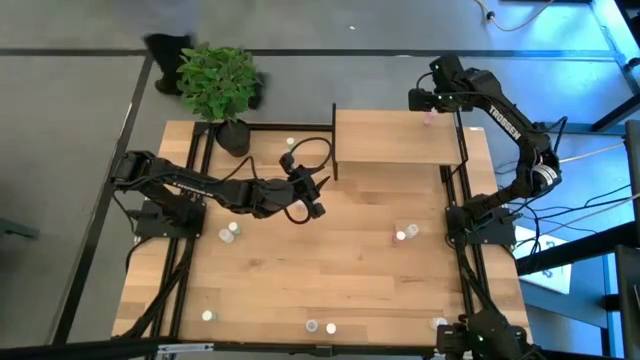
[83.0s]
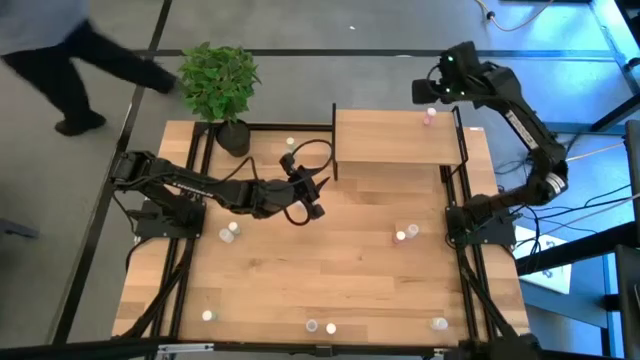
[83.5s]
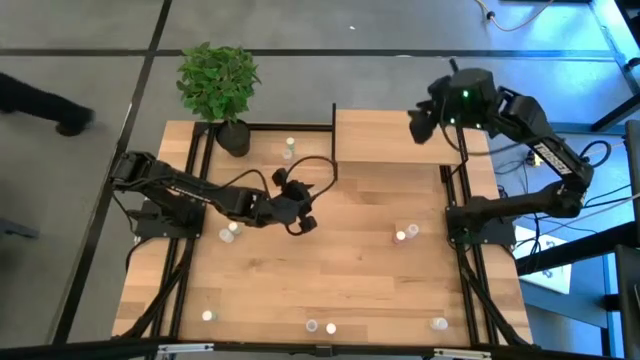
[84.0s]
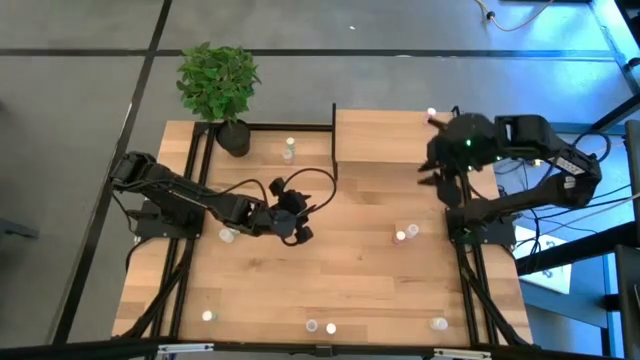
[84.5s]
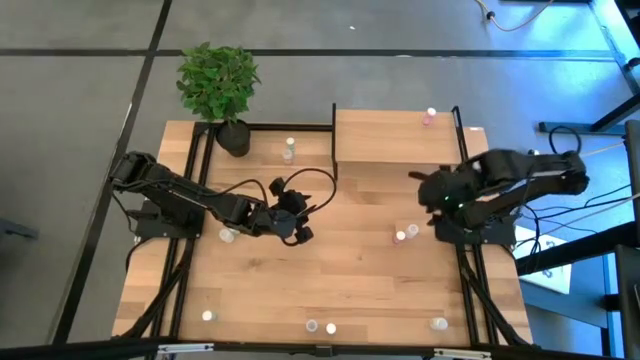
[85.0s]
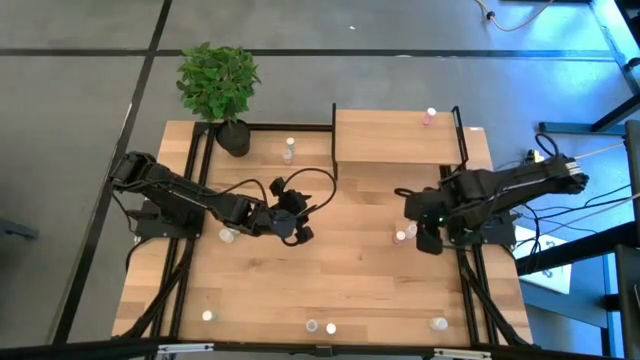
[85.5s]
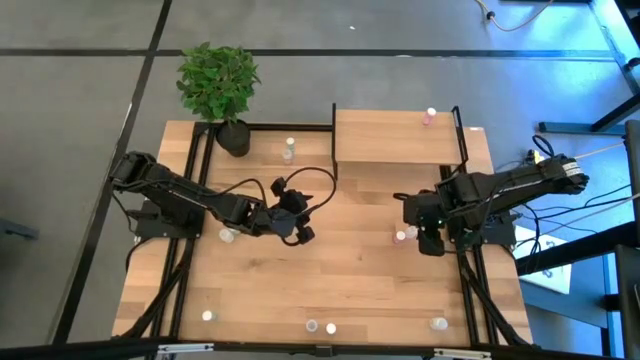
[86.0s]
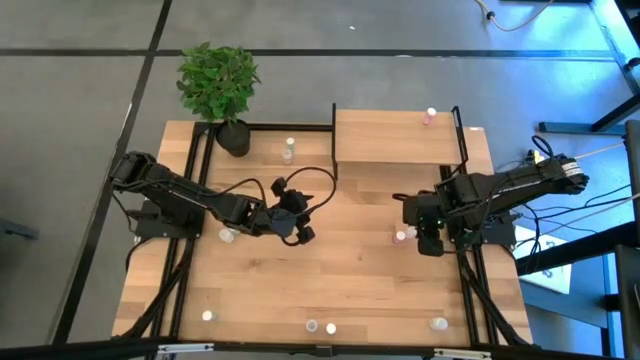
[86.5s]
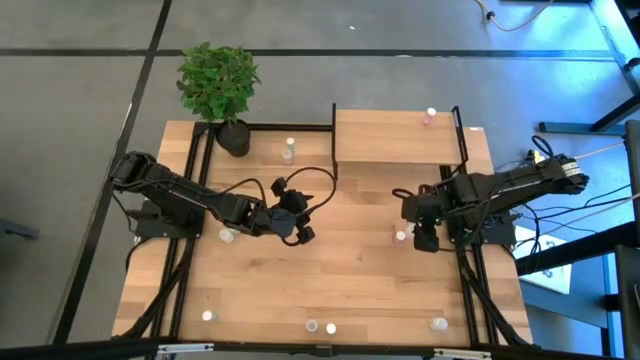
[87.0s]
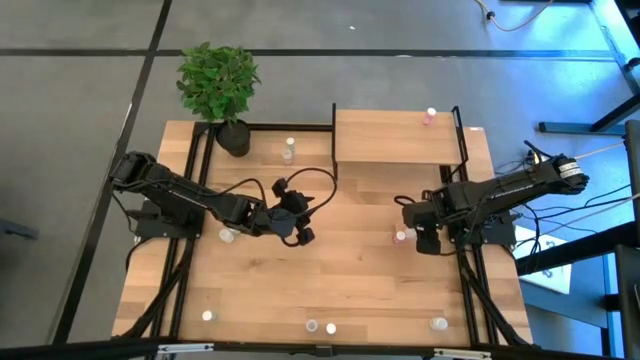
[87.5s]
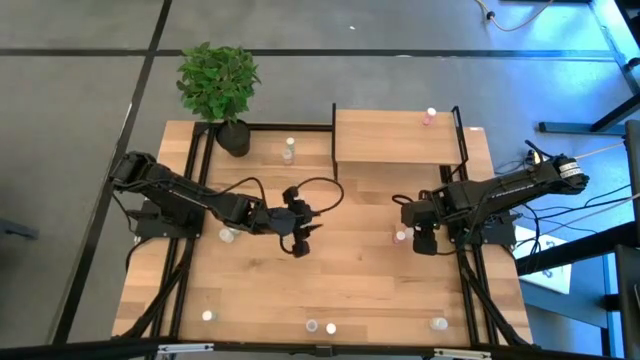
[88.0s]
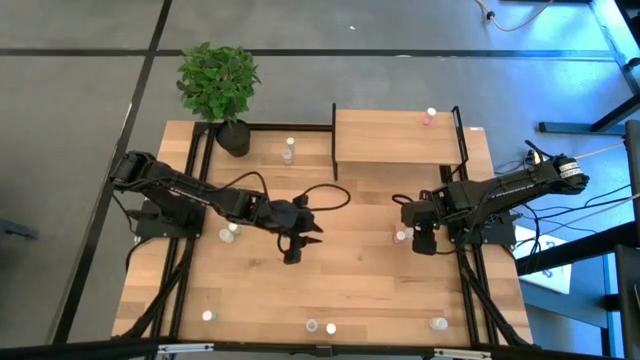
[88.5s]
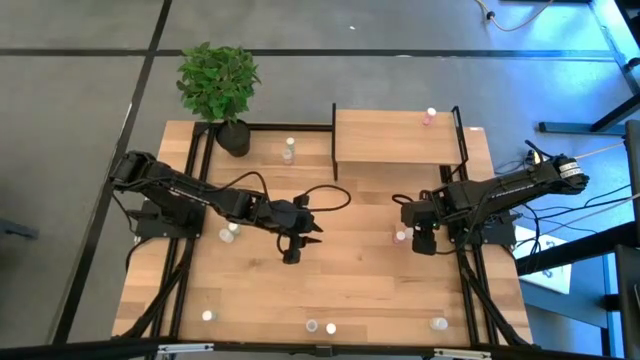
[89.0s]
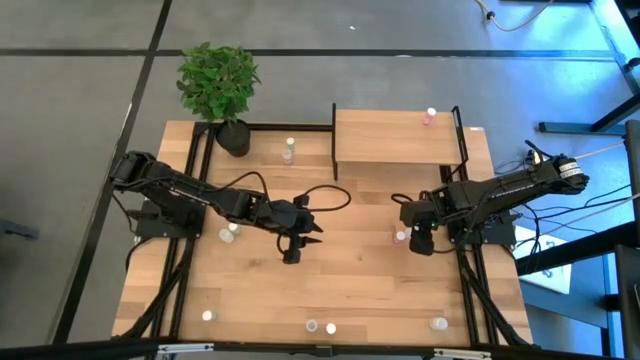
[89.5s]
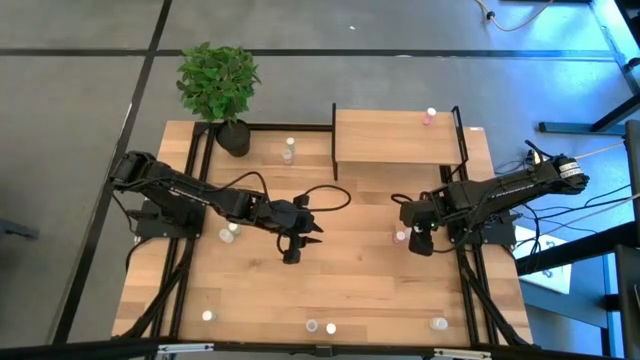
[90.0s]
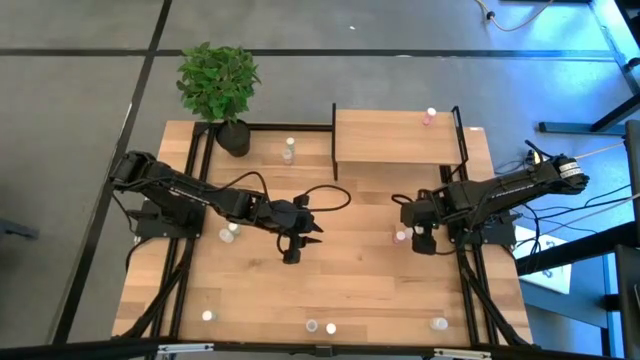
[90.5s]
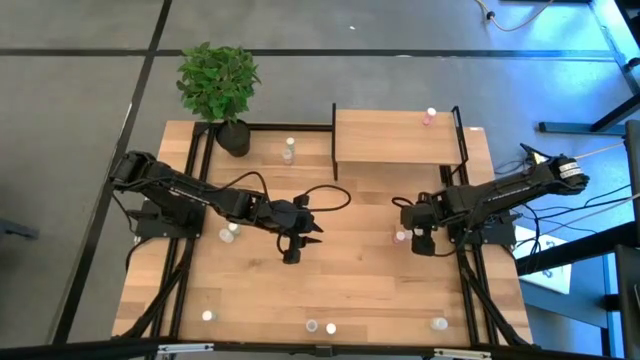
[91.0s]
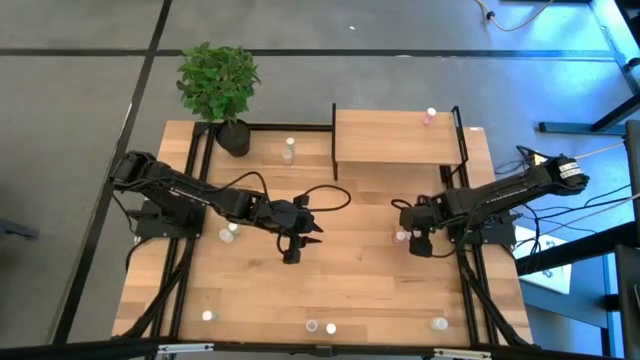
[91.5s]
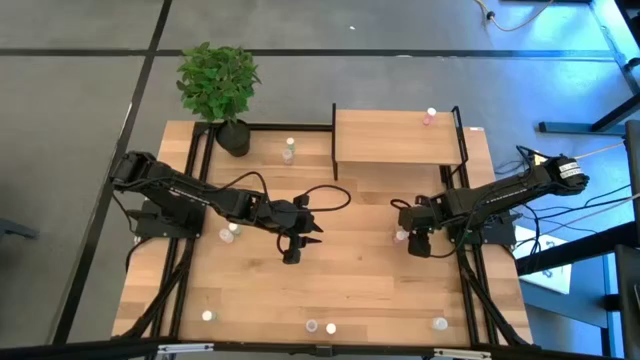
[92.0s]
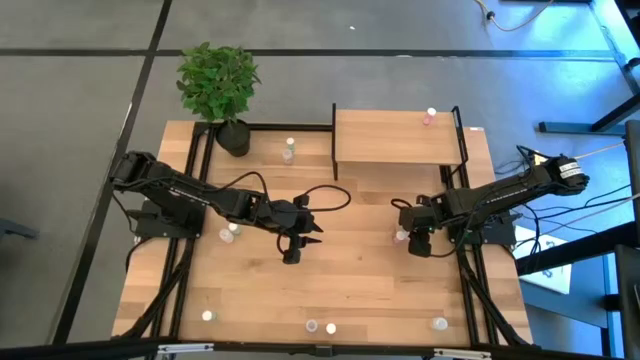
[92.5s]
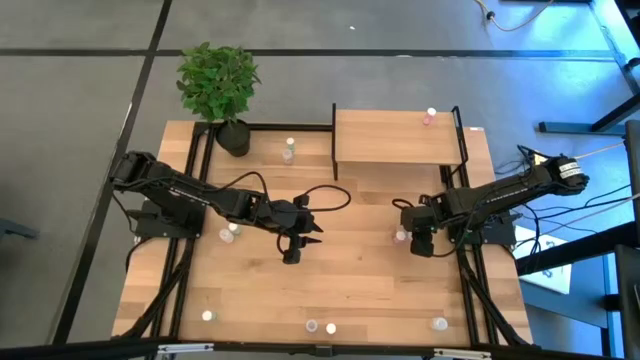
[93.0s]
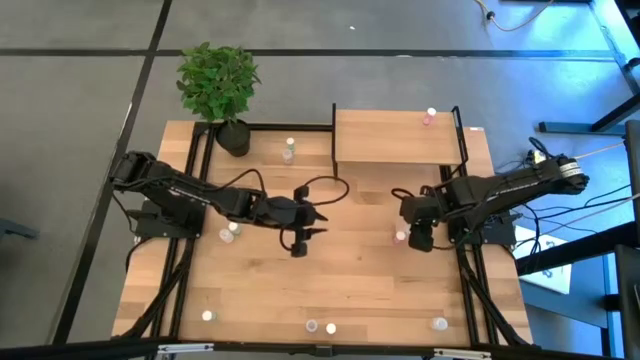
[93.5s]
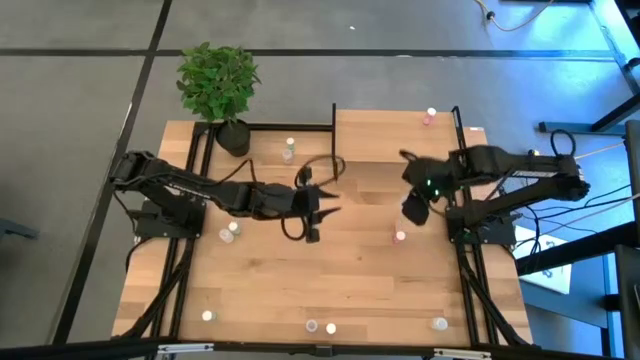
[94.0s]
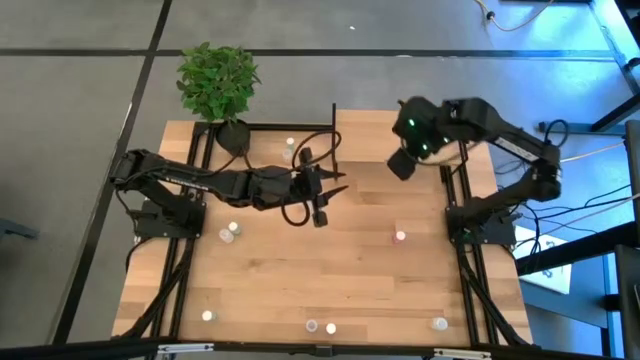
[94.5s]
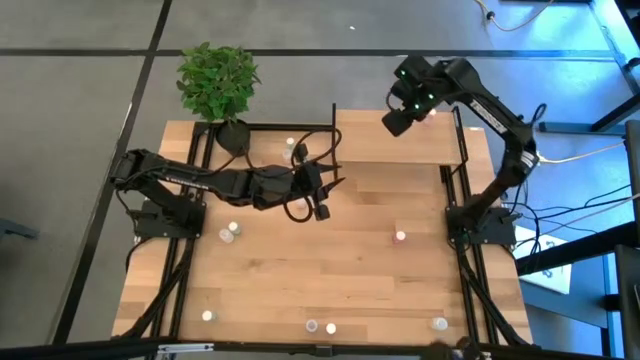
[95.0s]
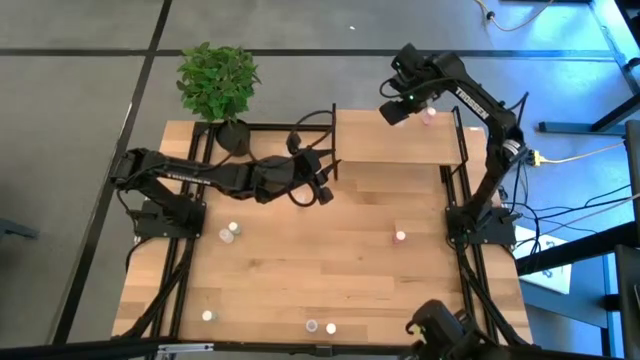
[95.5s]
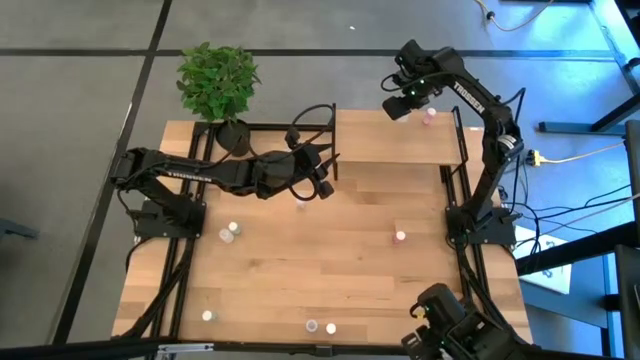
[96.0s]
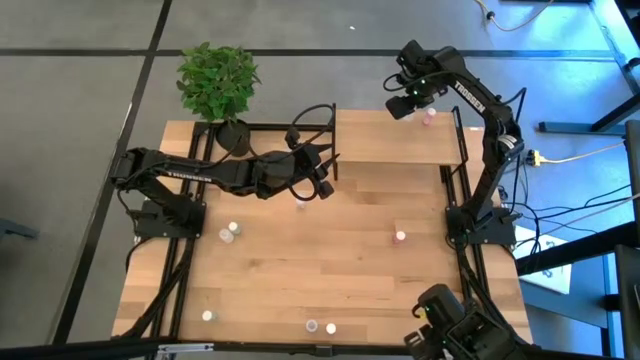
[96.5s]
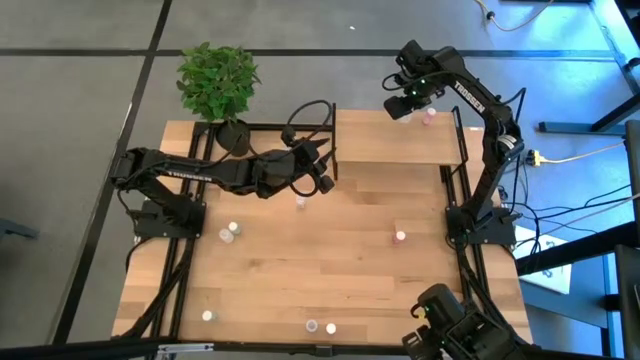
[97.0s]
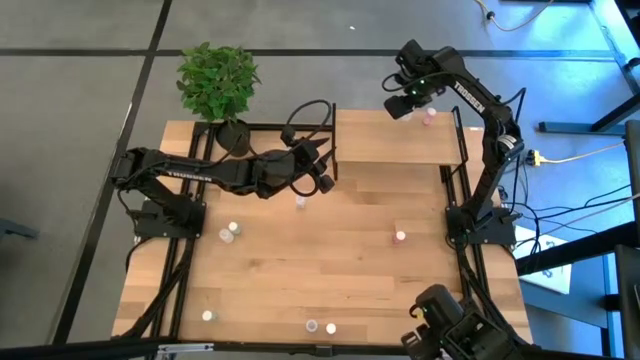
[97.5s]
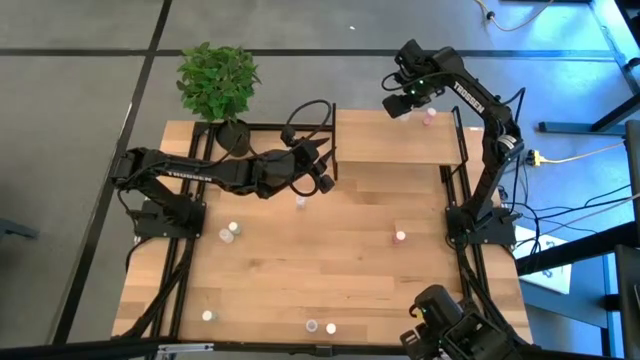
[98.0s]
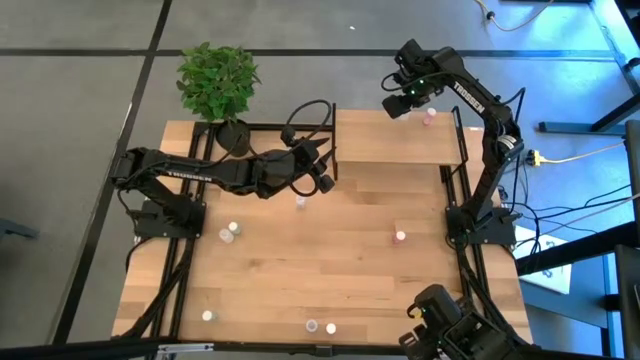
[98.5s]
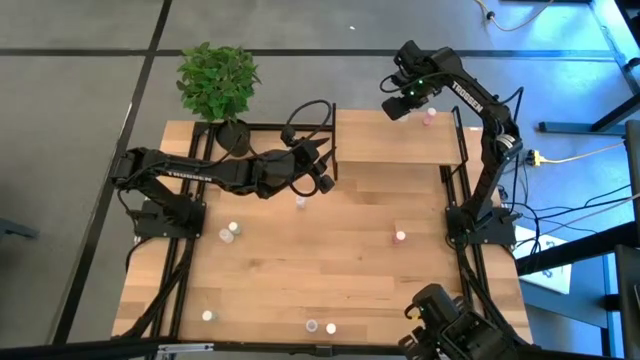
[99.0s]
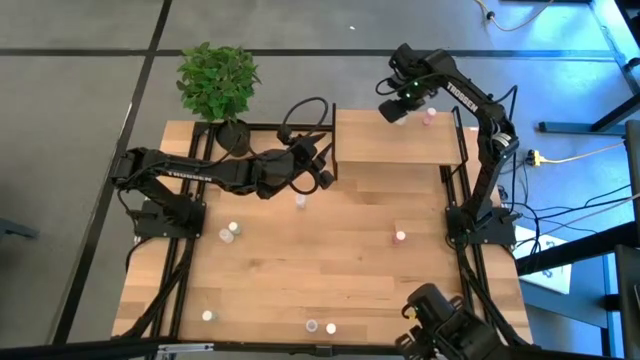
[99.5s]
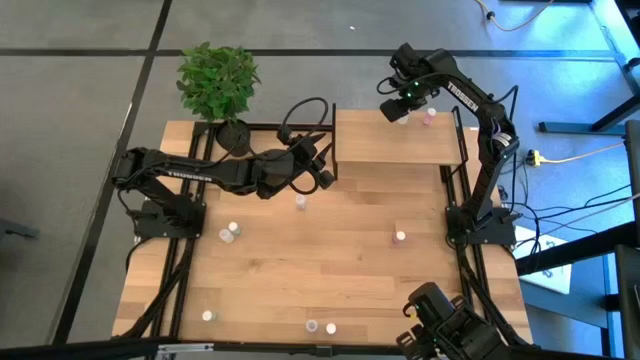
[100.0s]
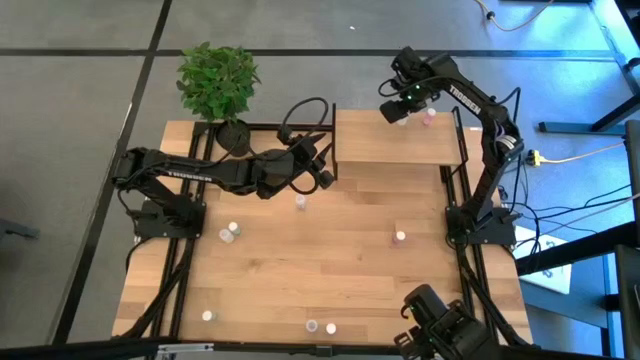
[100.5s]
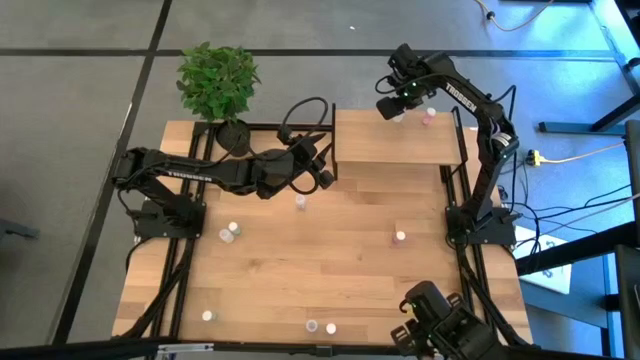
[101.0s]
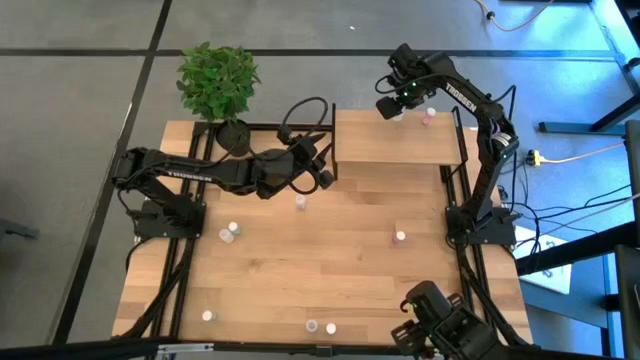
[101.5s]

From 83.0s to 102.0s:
Task: Pick and place medicine bottles onto shelf by color
Put the top right white pill bottle on the shelf
